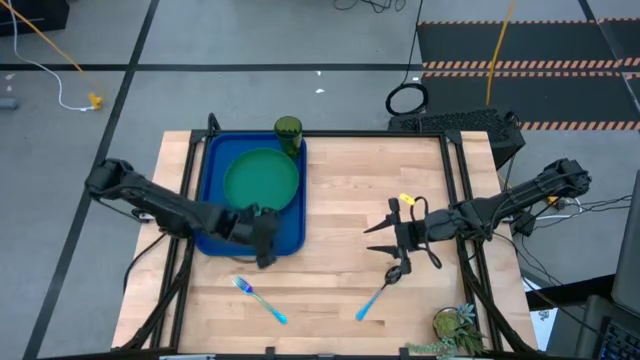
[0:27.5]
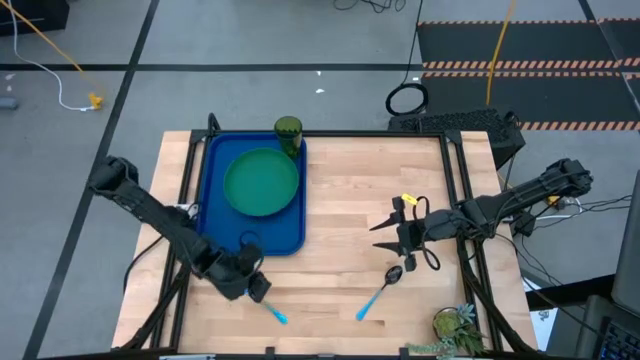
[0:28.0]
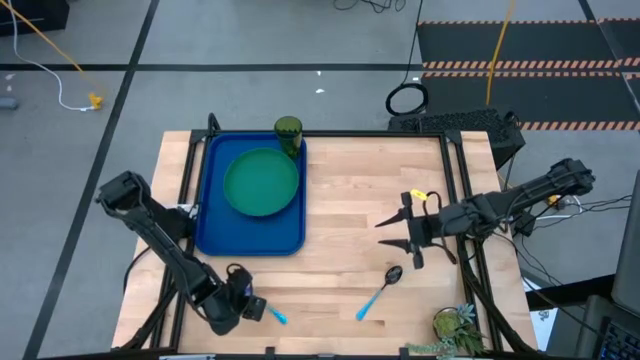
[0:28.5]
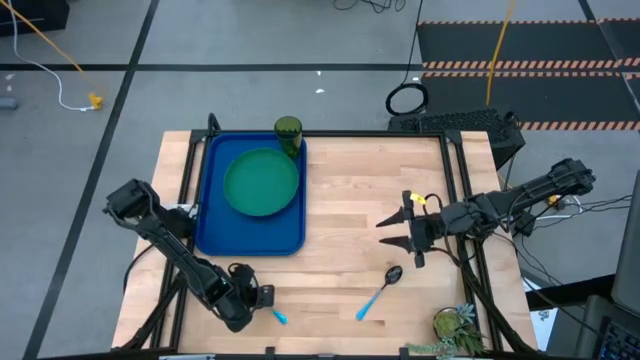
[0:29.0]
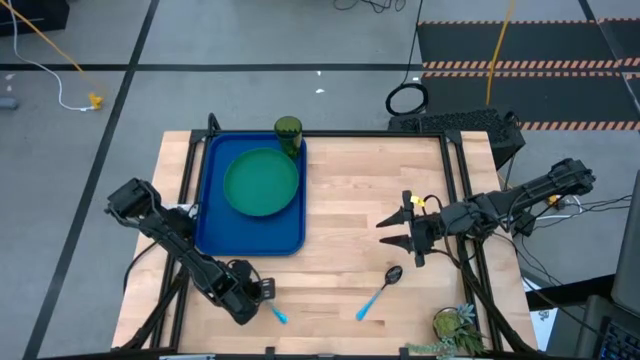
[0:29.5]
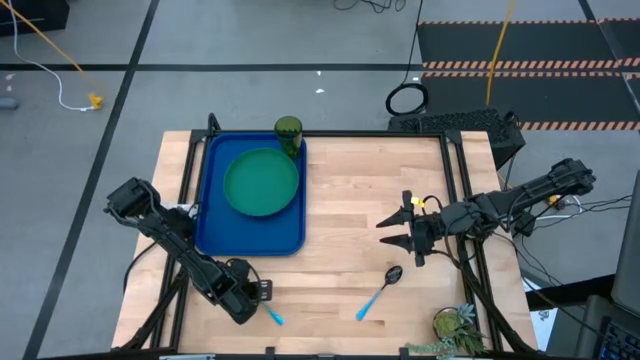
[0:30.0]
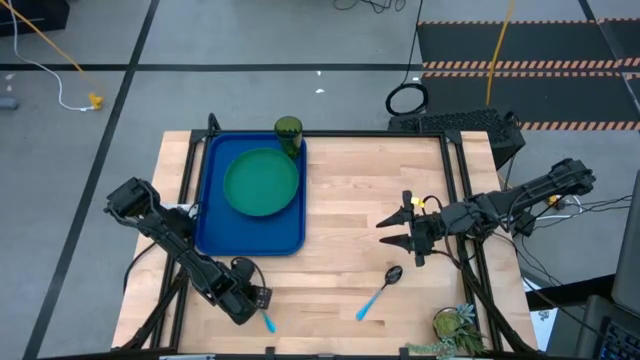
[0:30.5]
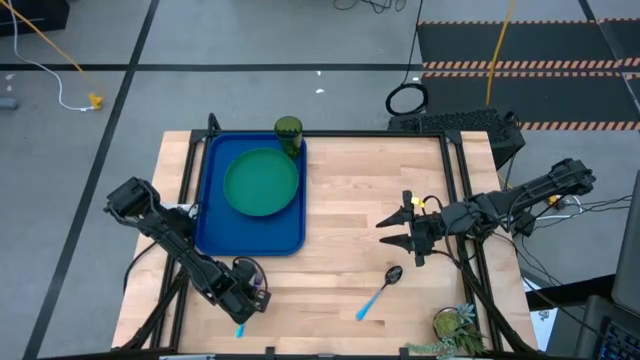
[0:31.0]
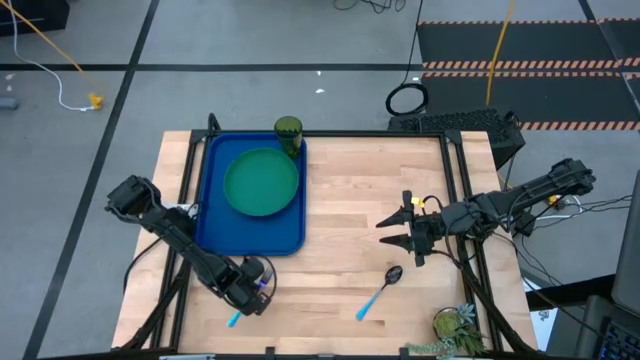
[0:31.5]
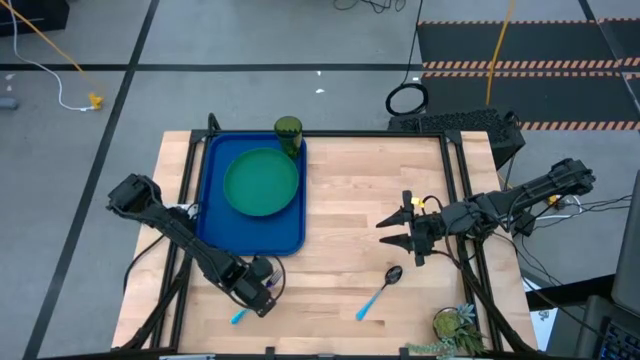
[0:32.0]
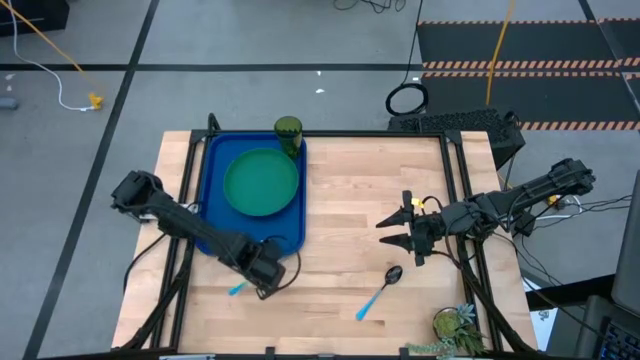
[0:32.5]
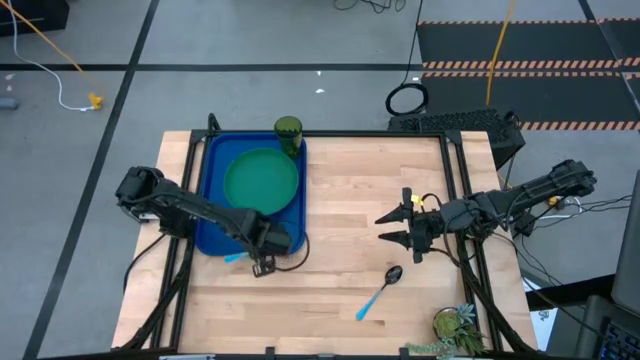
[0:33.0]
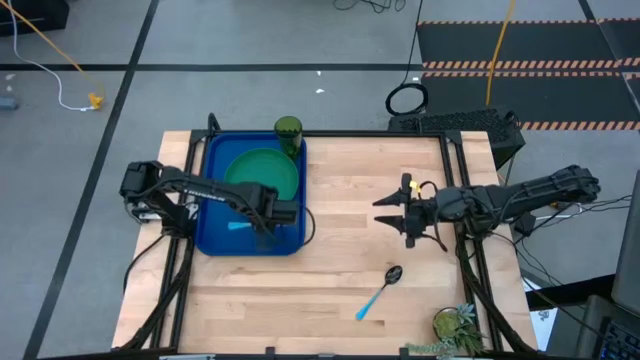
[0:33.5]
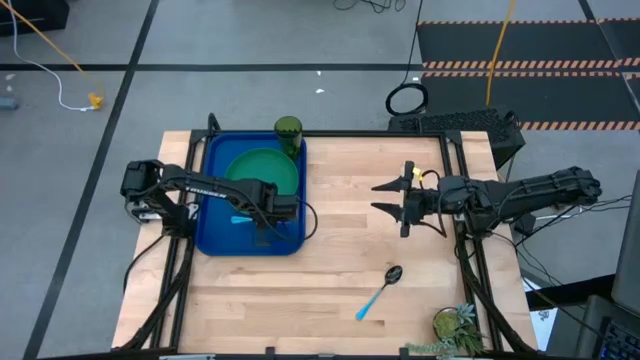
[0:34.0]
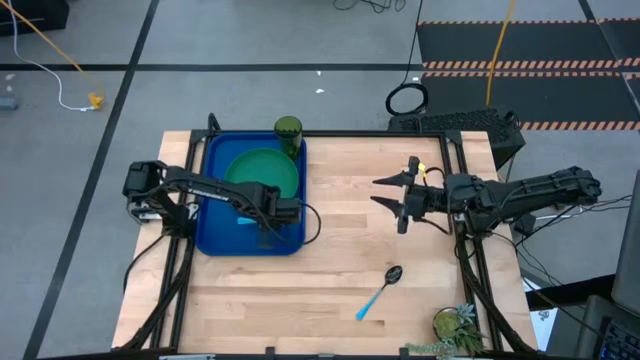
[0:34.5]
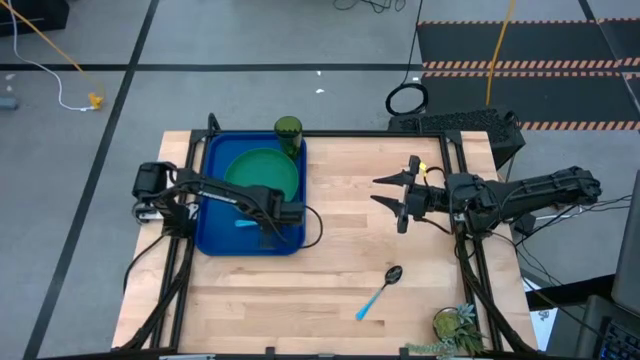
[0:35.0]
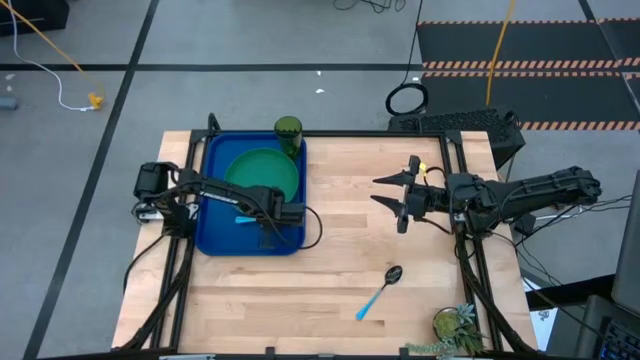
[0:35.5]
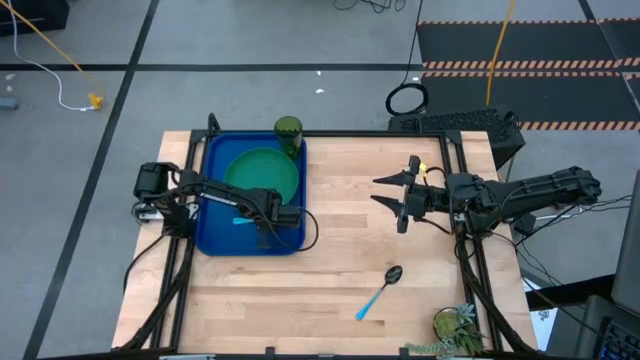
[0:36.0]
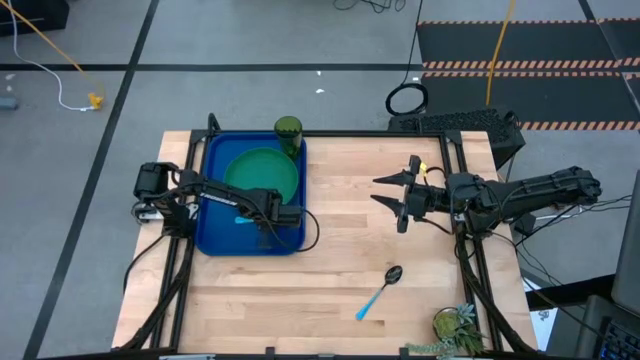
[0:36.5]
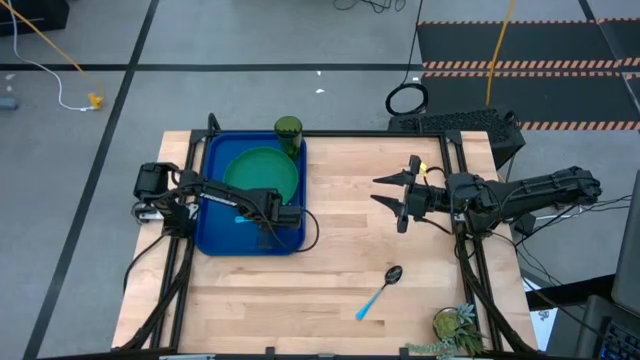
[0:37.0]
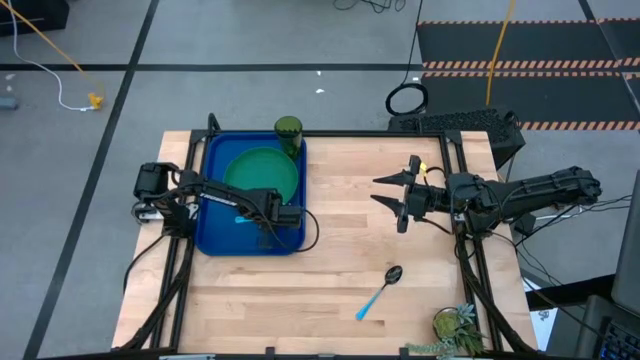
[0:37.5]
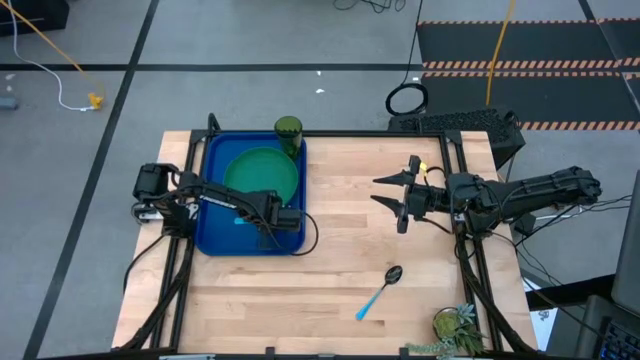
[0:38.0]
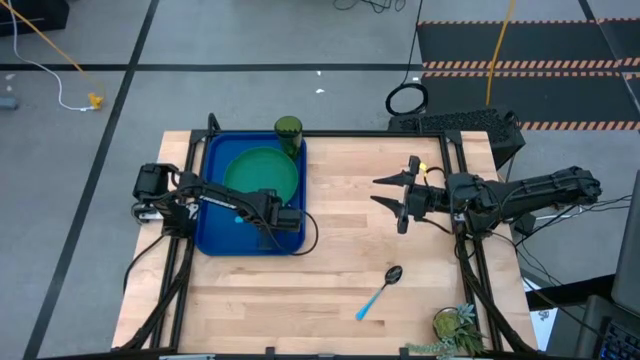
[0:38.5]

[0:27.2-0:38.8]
Task: Pick and place plate/cup/fork/spoon on tray
Put the fork on the blue serving tray to the right of the green plate

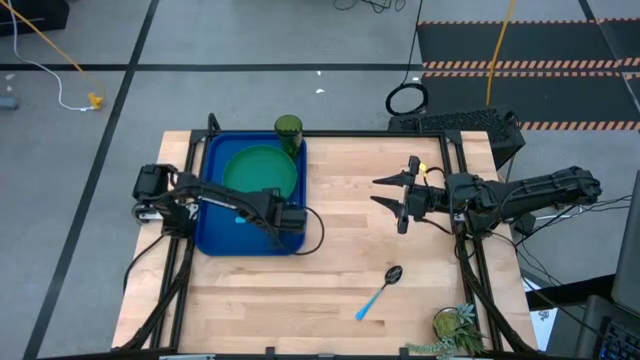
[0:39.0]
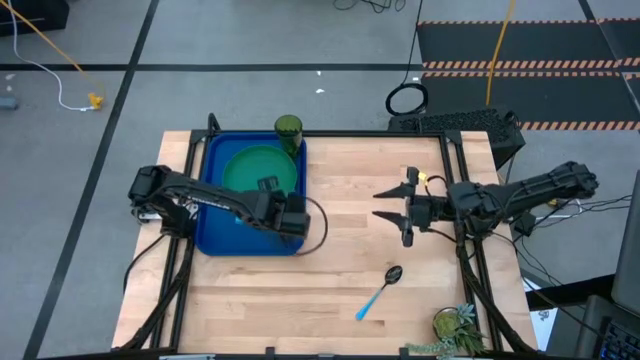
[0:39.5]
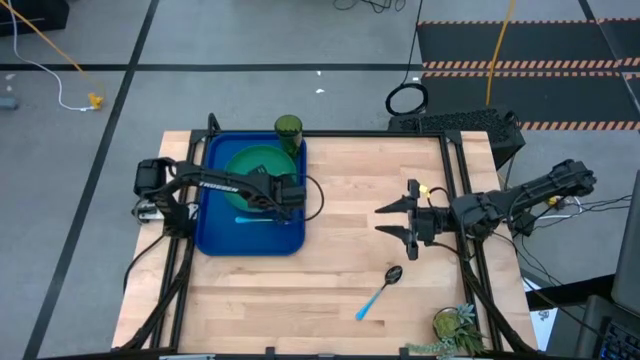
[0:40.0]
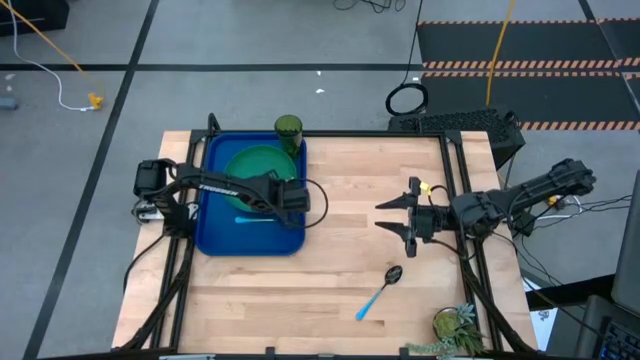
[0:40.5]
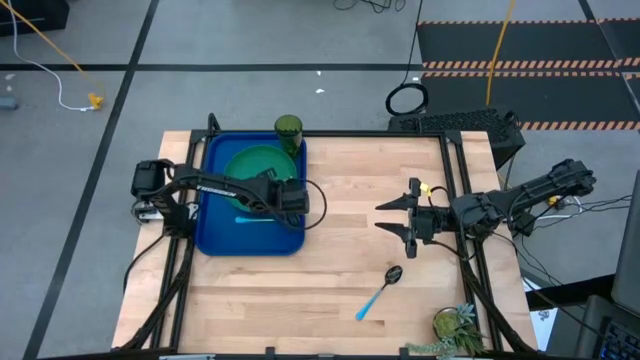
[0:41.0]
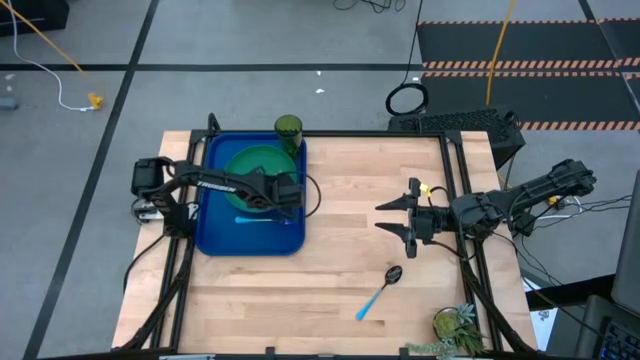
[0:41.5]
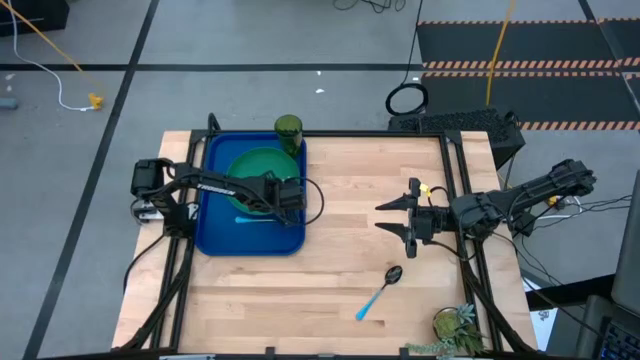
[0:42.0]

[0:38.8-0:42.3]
Adjust the green plate

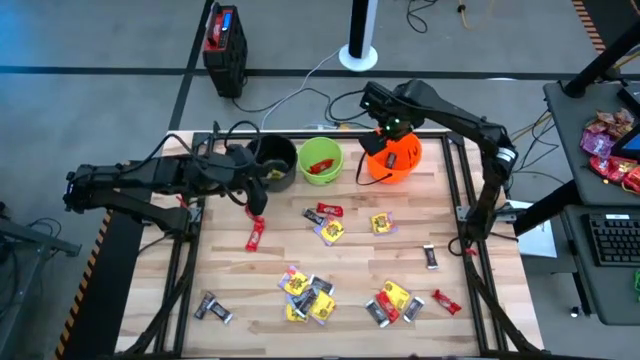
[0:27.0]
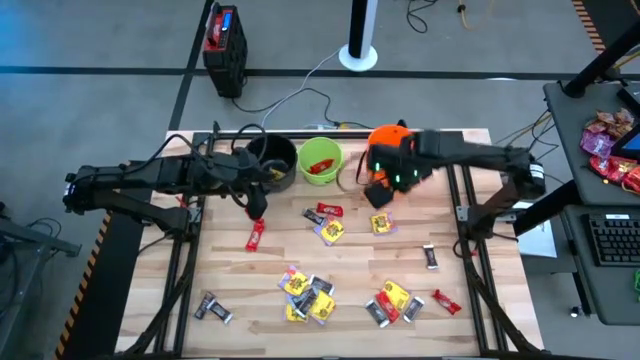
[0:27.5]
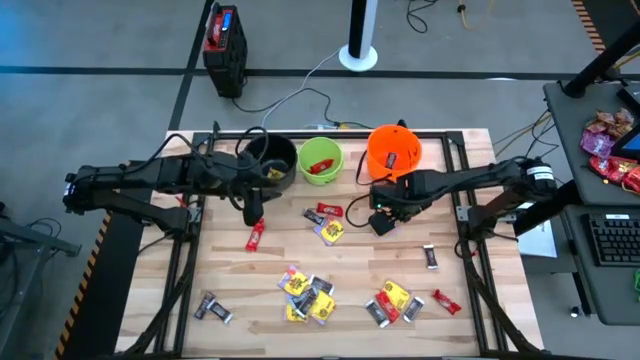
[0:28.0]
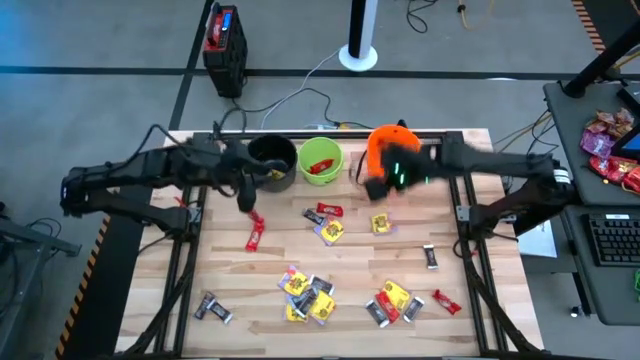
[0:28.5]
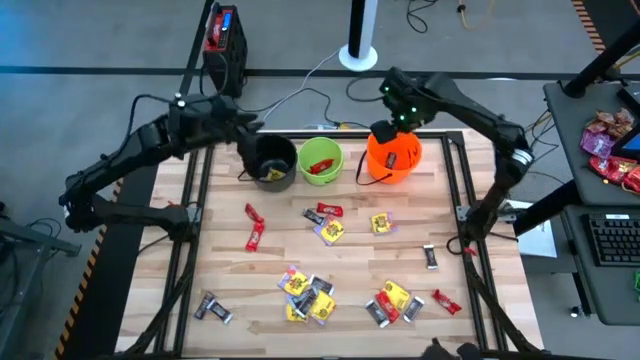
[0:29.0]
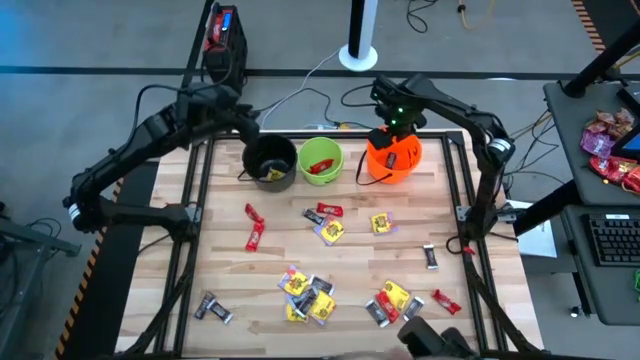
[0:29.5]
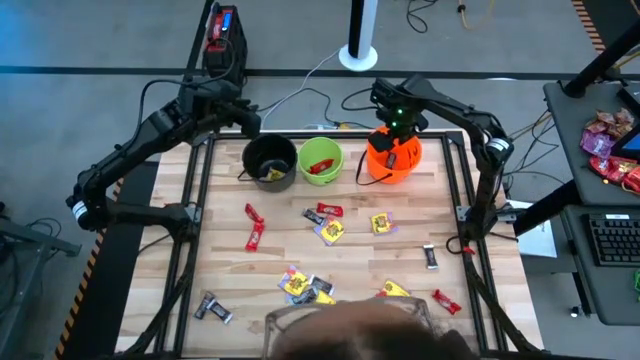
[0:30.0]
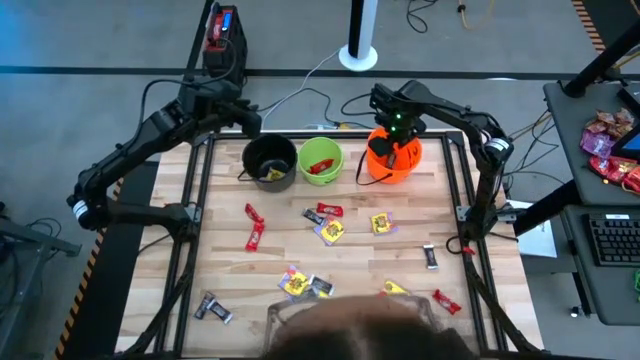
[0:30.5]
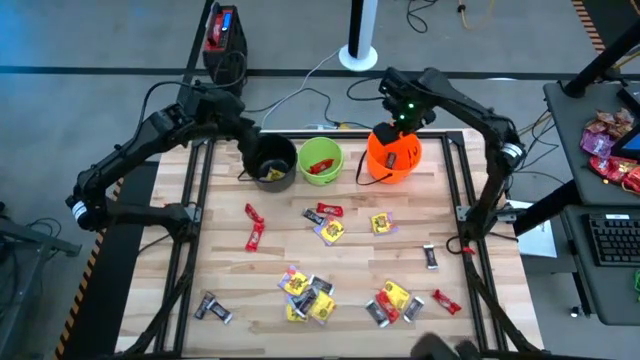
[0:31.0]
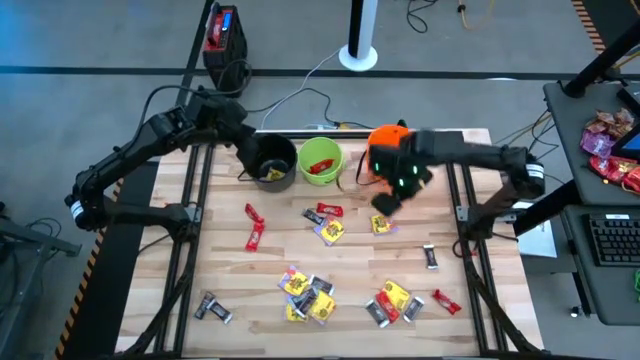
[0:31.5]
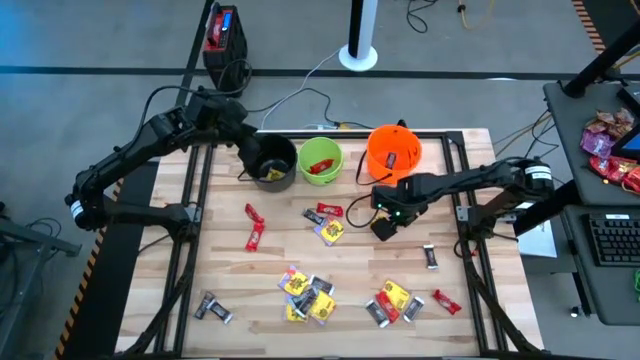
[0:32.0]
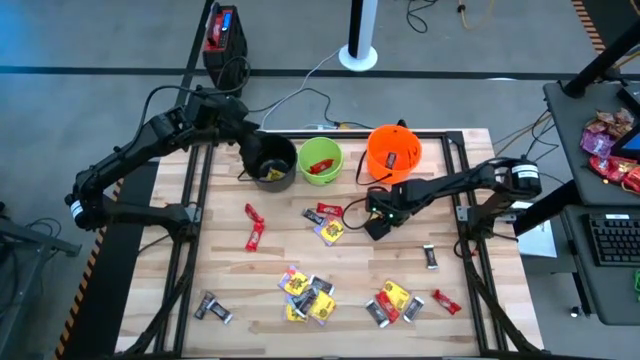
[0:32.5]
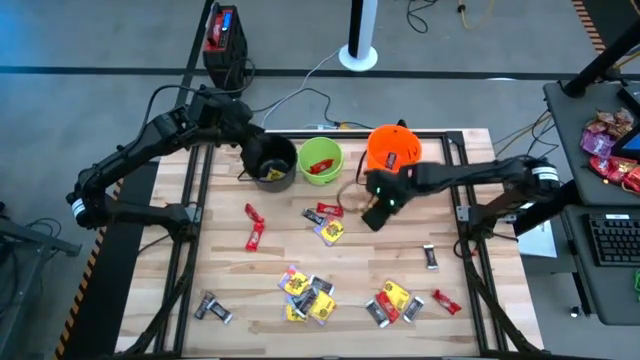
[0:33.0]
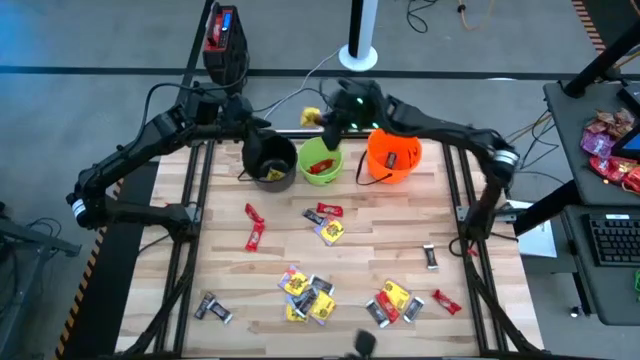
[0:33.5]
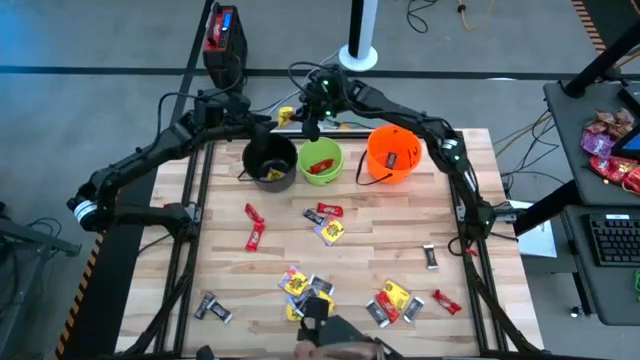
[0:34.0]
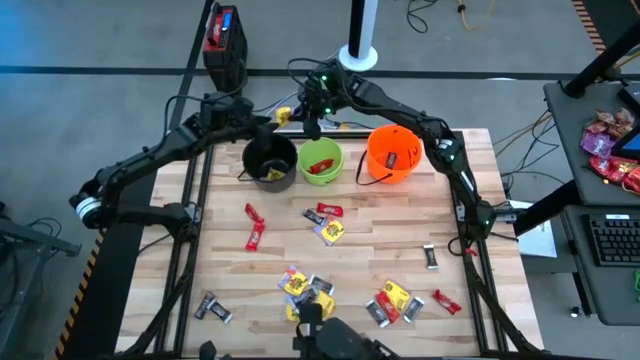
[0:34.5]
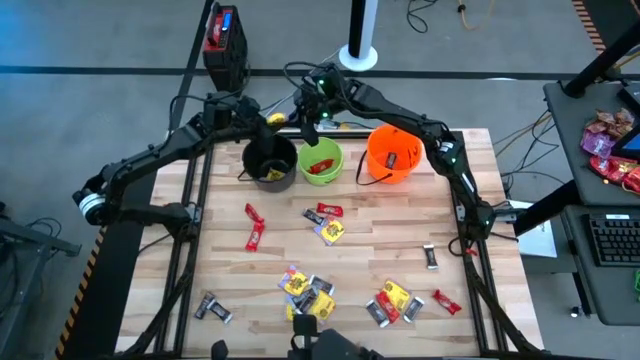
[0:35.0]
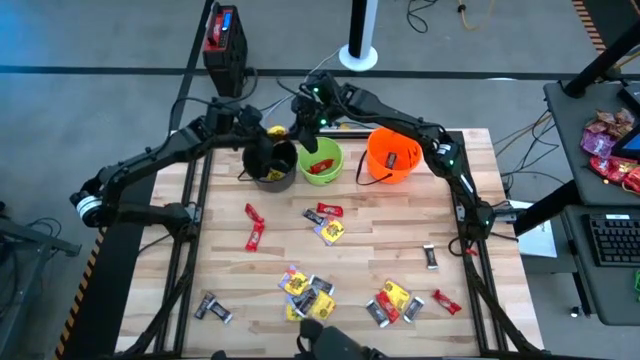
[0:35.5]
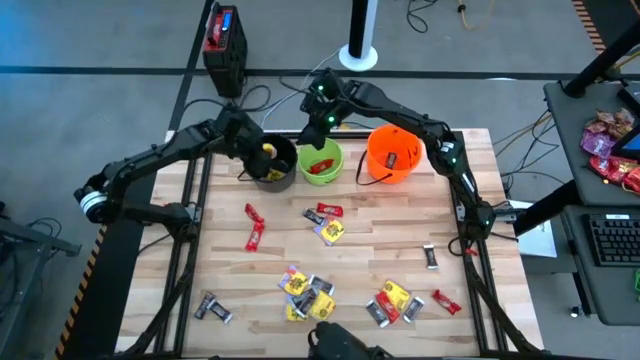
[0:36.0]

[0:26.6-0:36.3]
Task: Sort candy by brand, put in halloween buckets
Put the yellow candy into the black bucket
